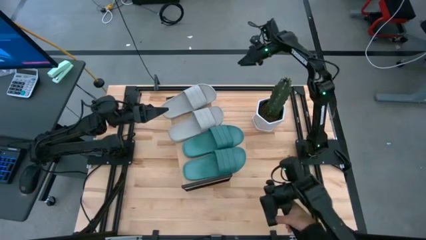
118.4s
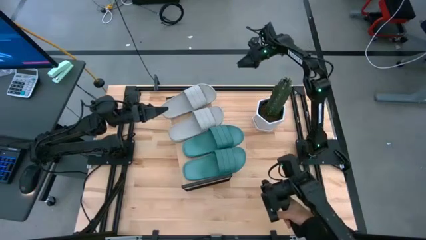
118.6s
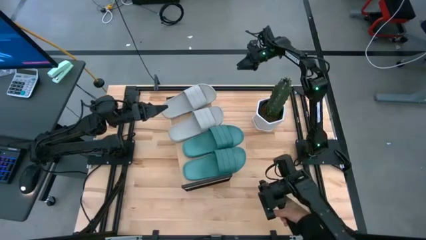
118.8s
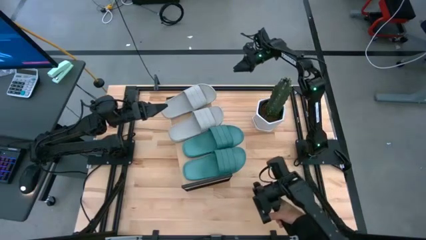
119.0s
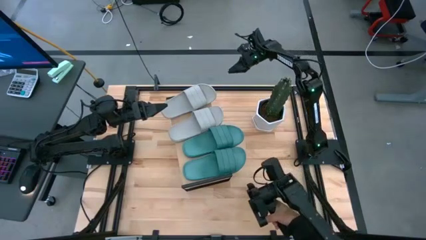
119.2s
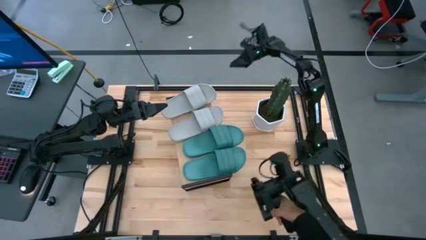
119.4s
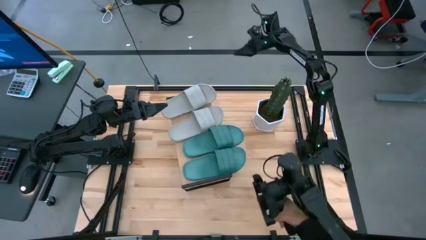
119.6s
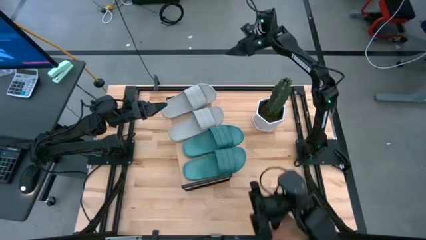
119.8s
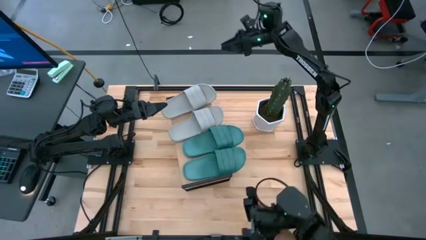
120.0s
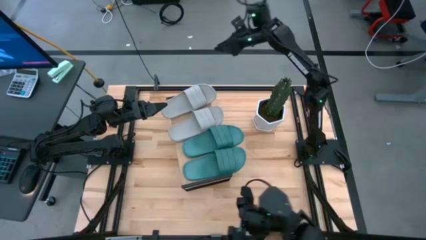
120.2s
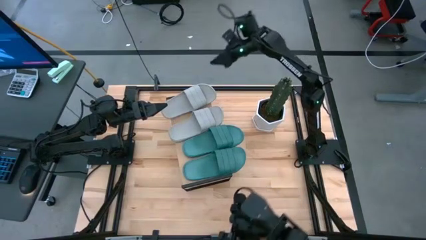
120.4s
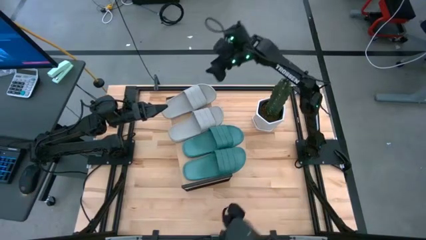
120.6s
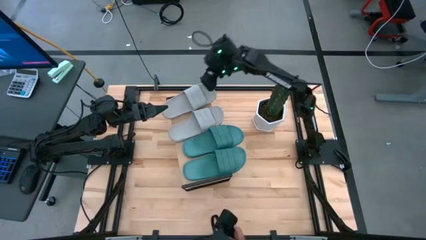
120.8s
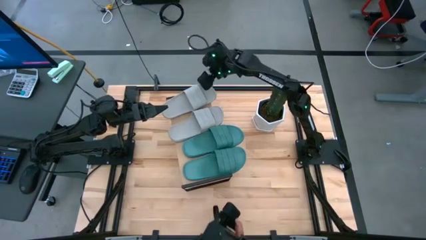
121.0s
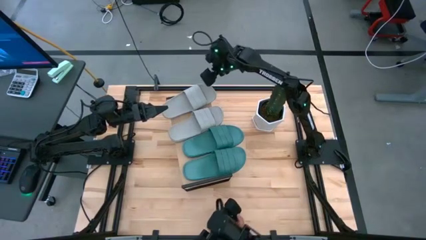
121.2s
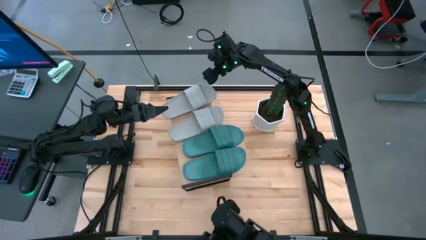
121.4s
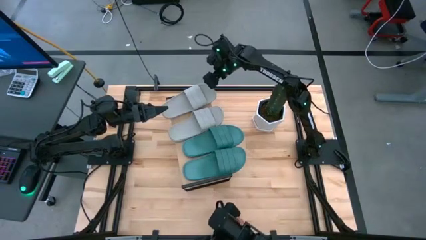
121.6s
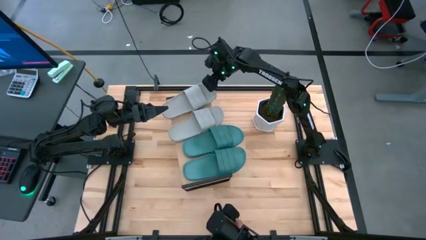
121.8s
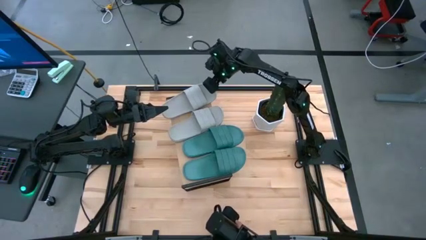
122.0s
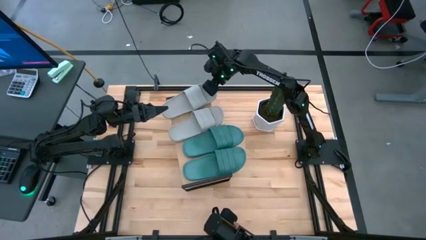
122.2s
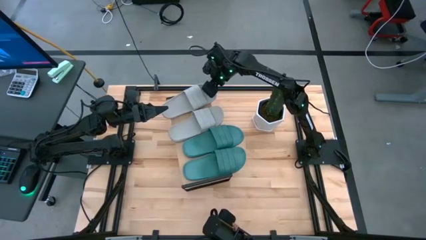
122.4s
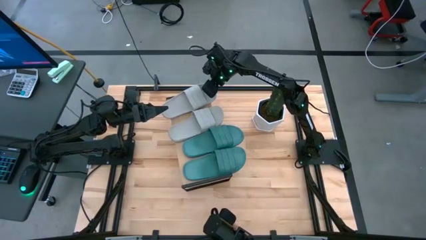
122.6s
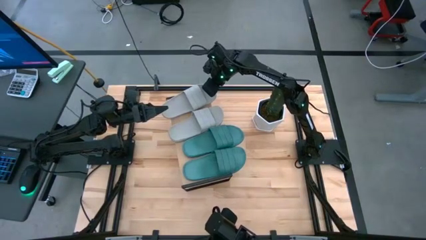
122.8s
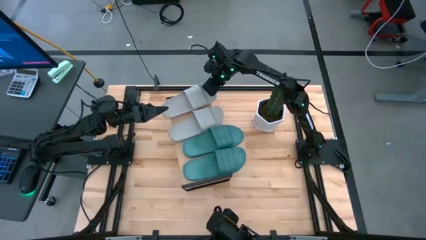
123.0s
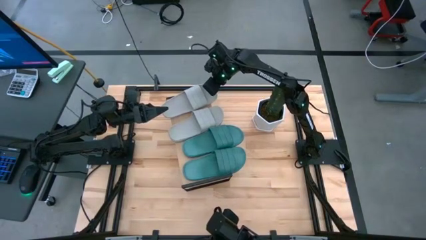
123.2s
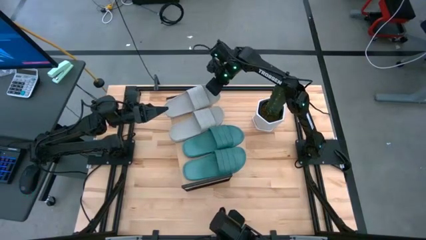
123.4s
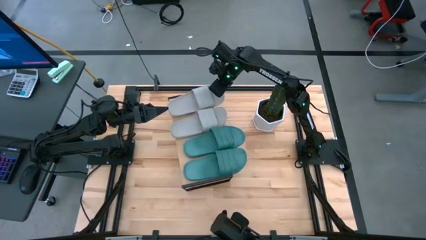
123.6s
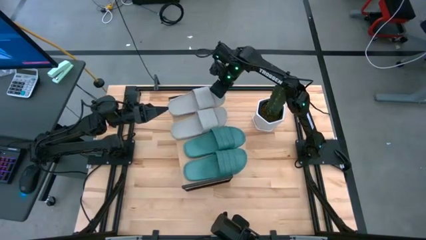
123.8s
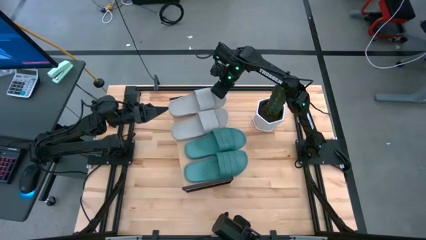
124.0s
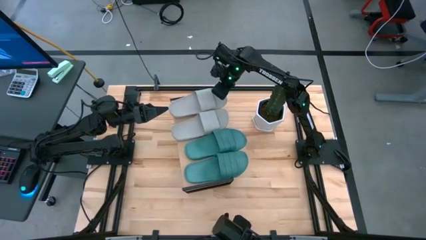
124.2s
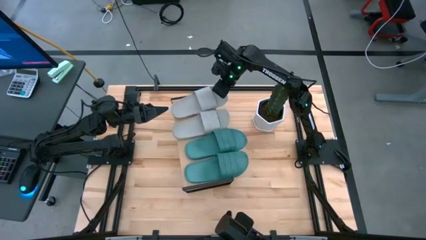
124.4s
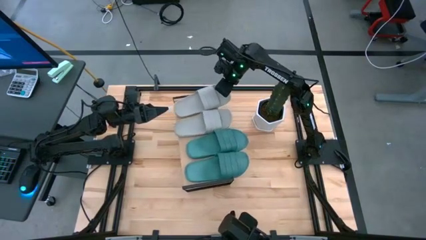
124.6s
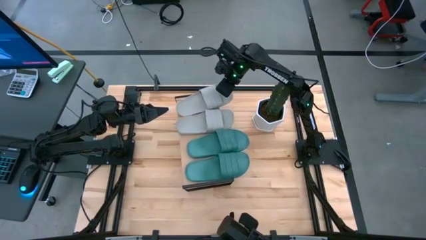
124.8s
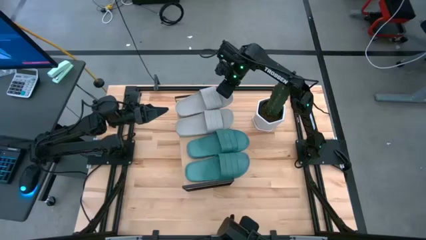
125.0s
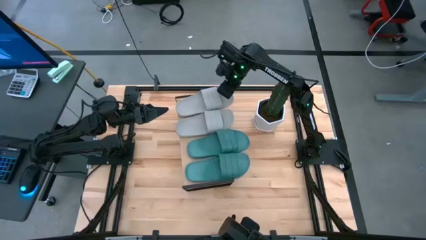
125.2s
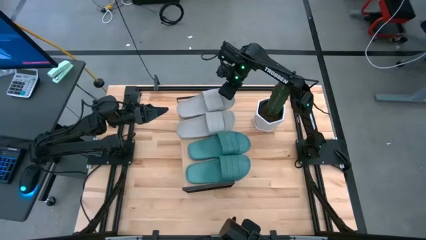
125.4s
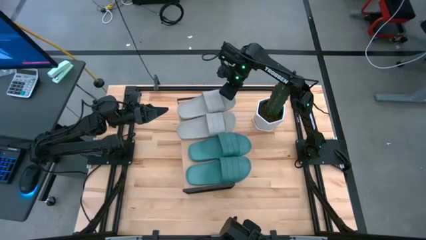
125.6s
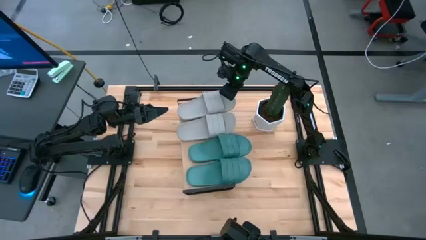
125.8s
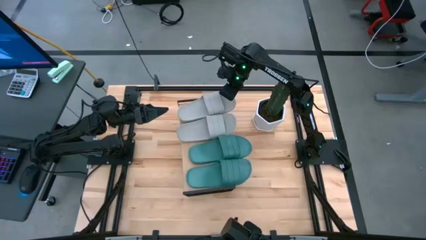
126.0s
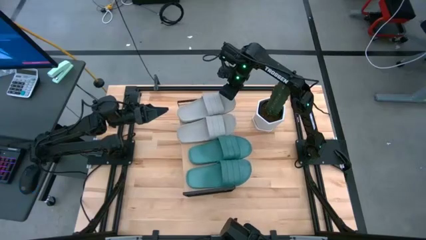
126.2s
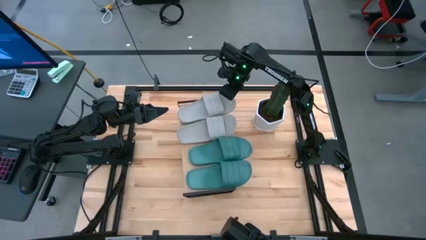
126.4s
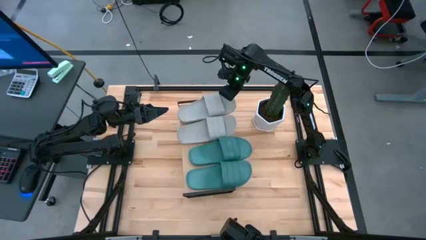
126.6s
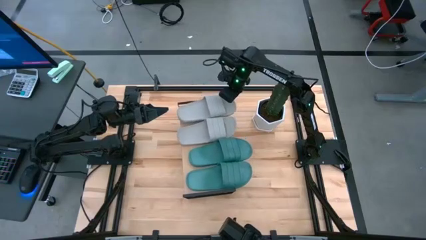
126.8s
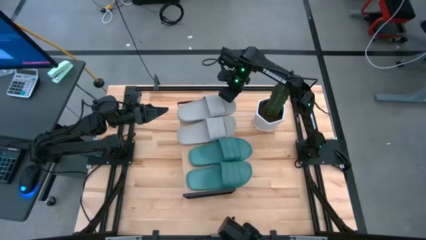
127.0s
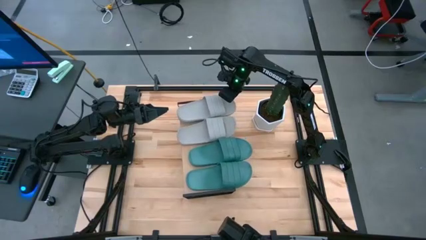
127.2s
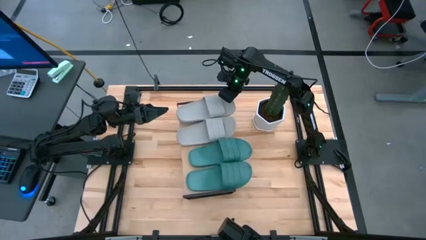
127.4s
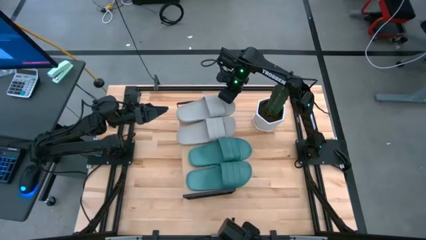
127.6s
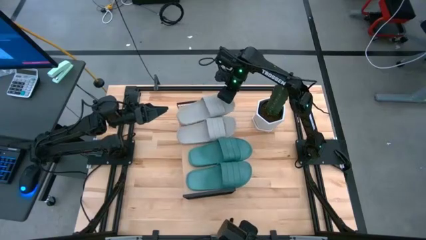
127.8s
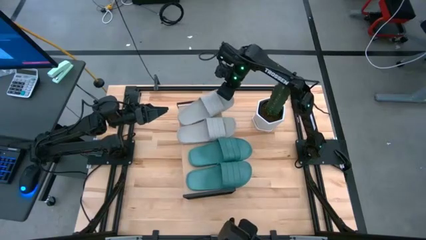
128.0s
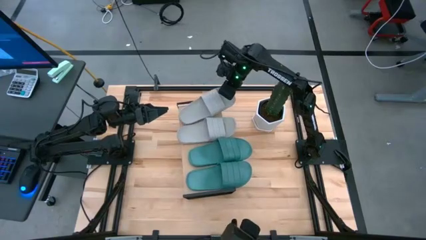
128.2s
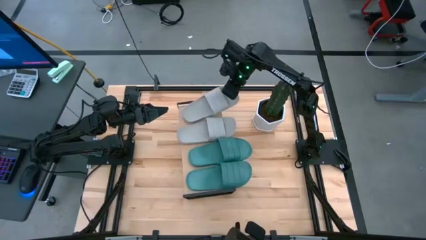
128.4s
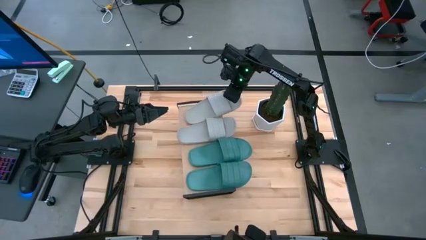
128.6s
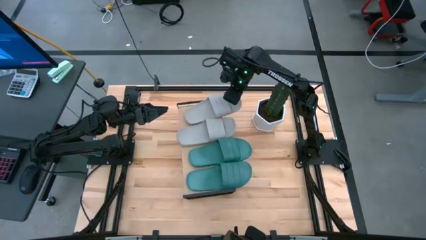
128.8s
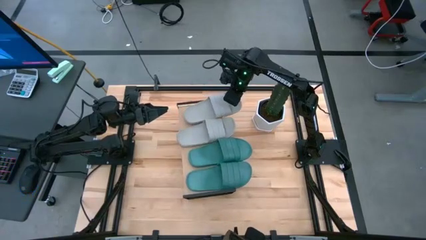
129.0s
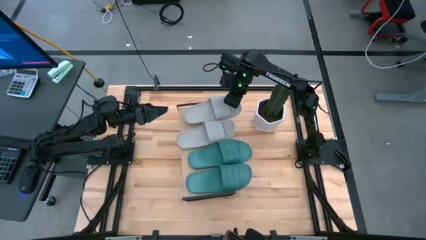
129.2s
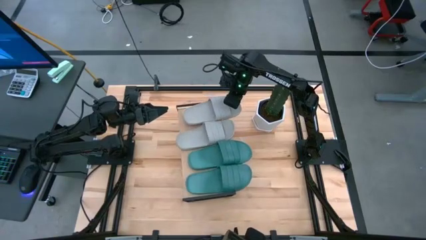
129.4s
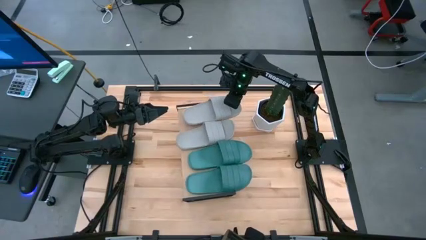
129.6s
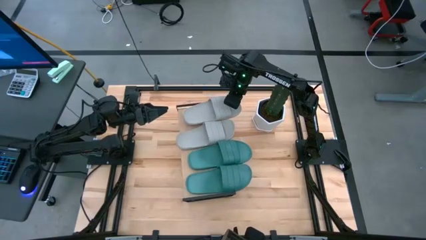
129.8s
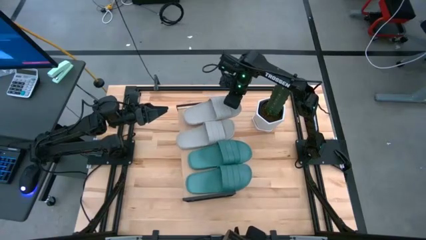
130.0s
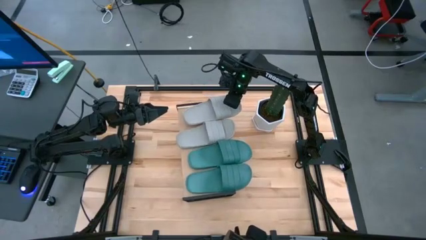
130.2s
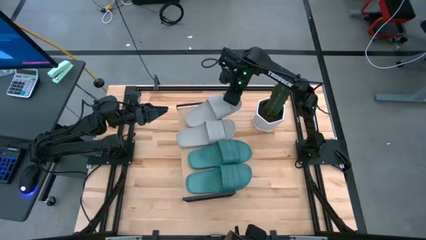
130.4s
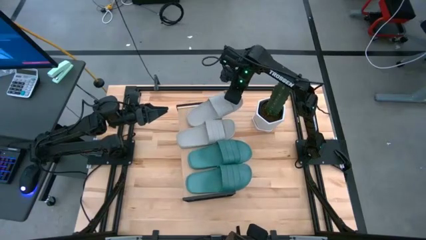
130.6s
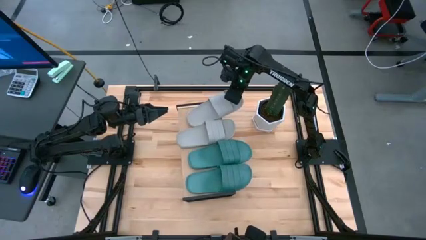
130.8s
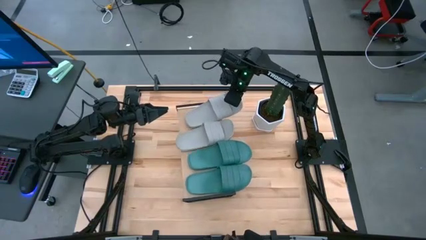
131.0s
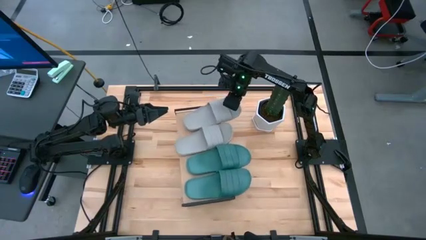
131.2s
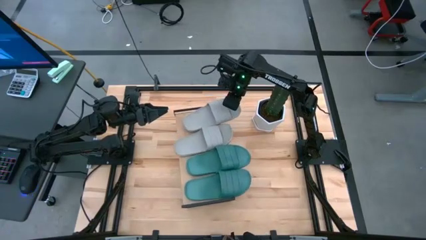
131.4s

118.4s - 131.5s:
Task: Pick and place slides into the shelf
Adjust the white slipper

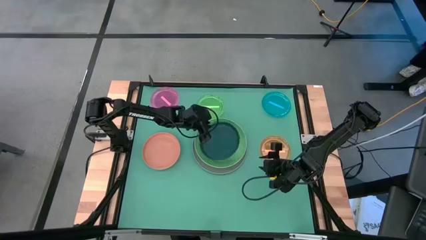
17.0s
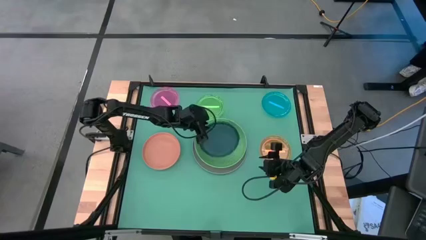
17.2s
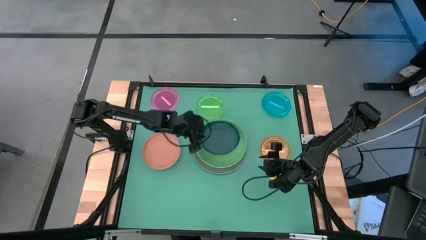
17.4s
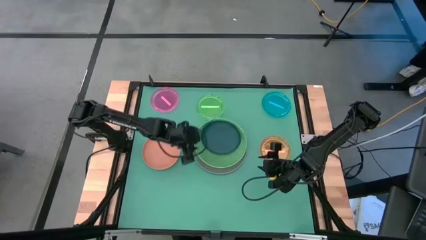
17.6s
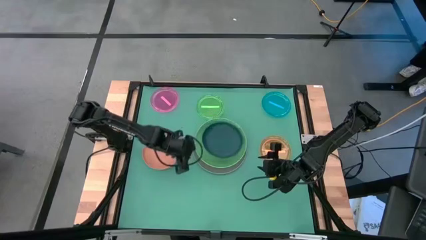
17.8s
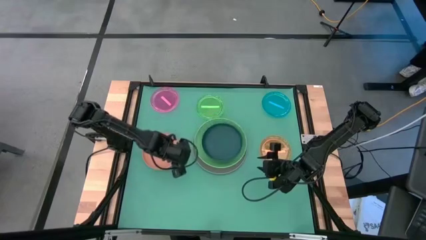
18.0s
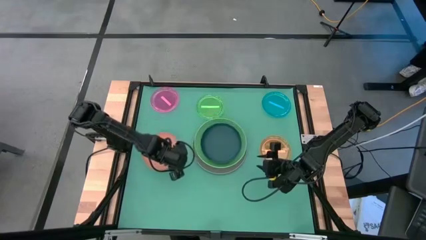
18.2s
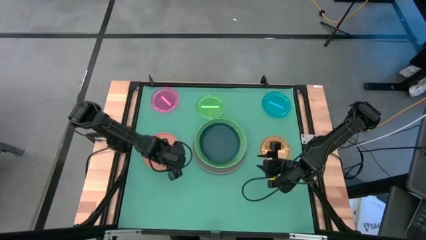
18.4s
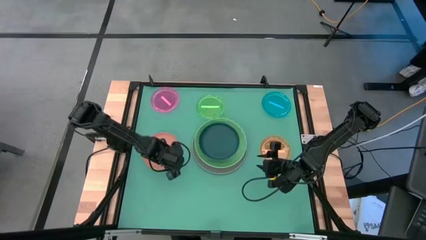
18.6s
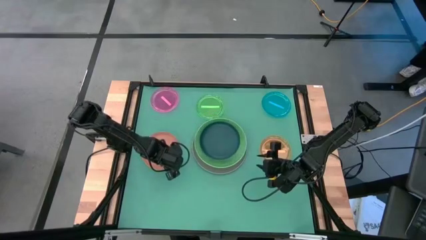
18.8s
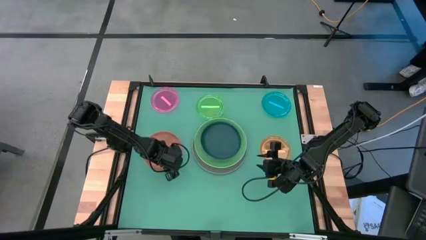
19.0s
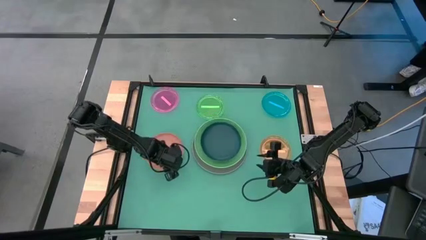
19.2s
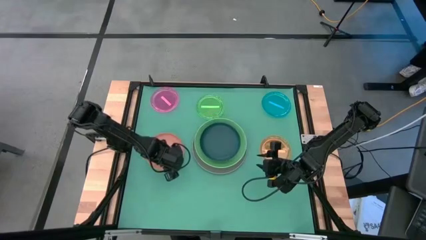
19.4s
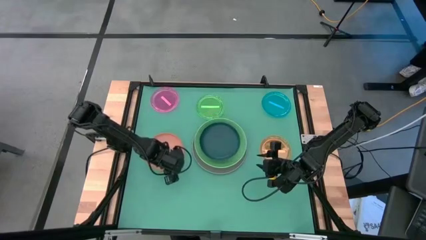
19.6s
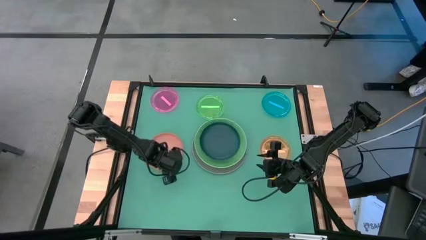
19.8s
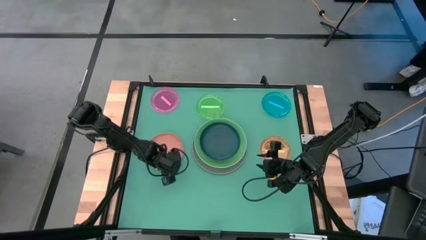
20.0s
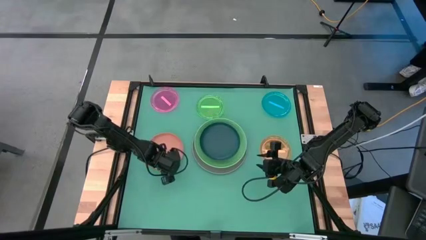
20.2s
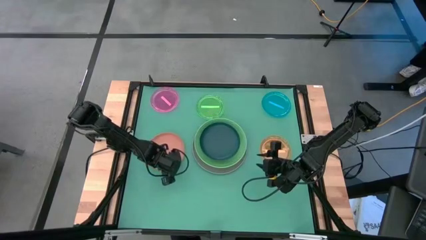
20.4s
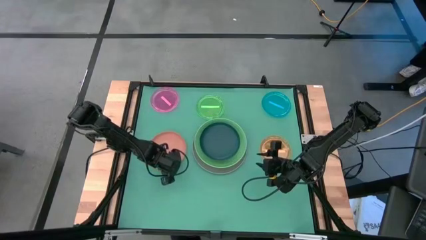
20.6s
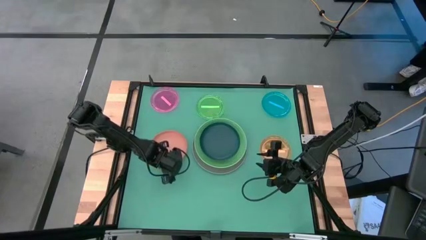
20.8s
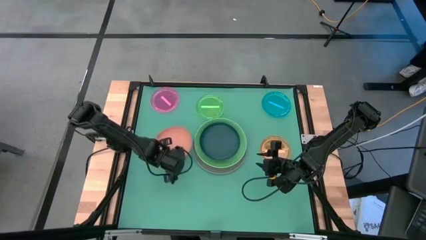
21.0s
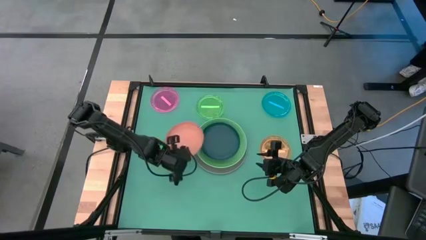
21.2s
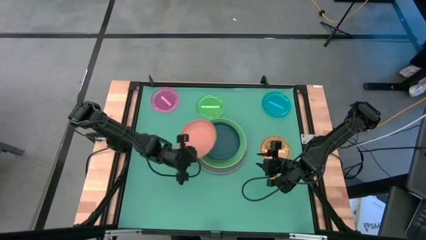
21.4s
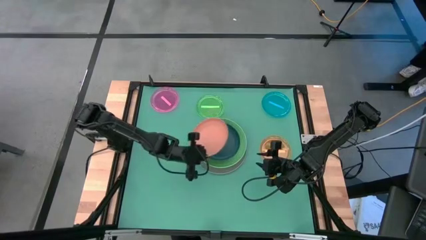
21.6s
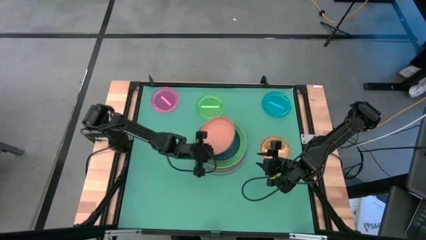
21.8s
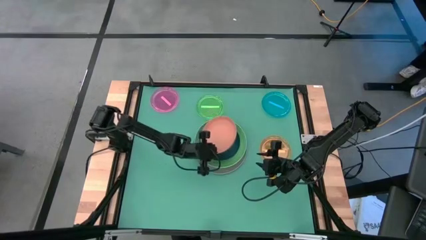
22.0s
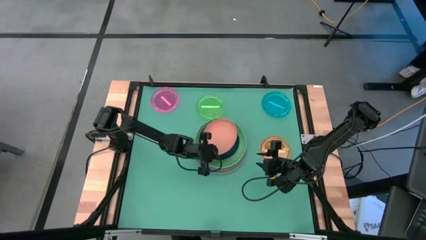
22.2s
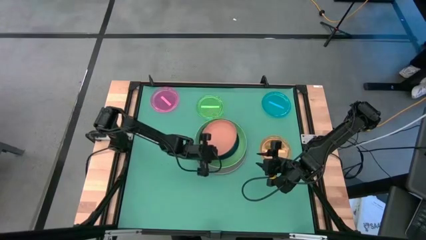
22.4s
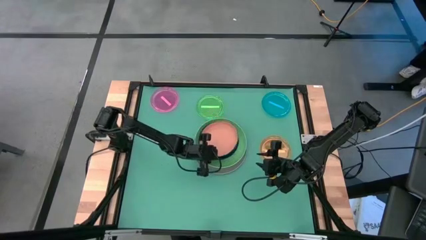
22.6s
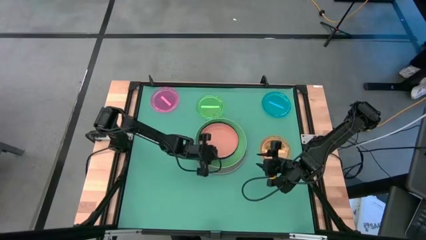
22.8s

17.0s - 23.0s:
Task: Stack plastic plates
Stack the brown plate on top of the dark blue plate
